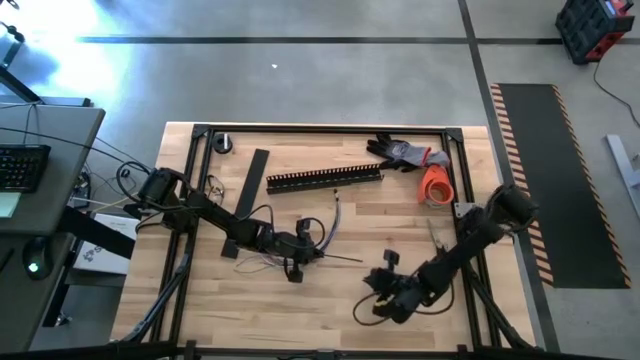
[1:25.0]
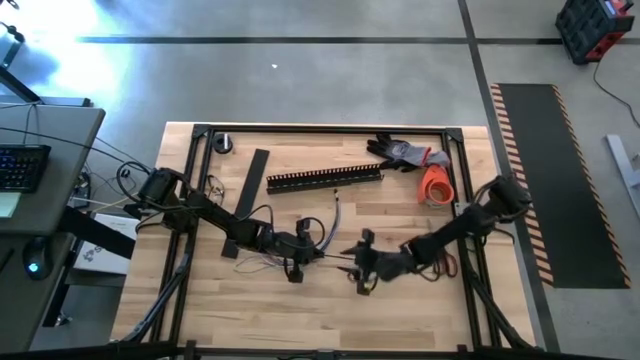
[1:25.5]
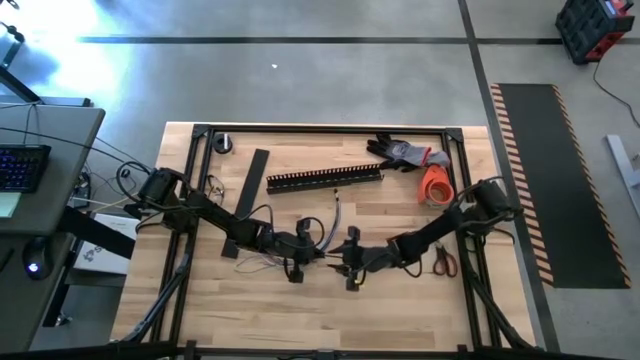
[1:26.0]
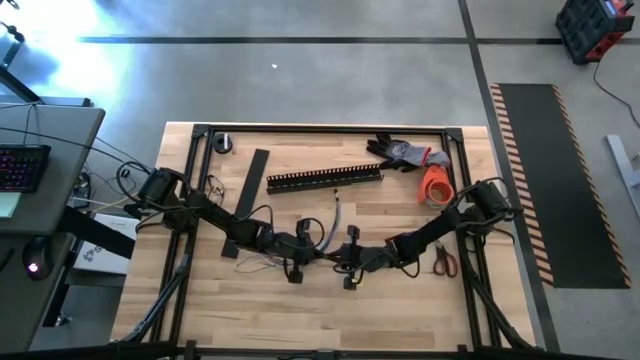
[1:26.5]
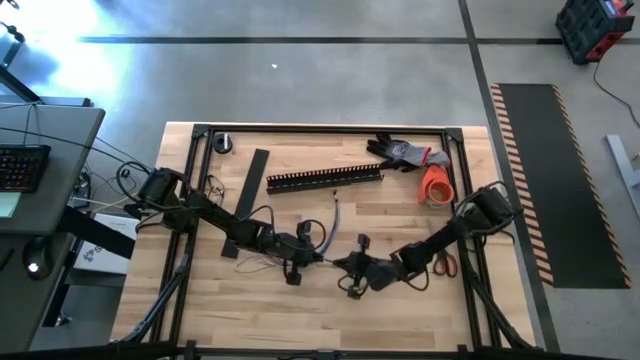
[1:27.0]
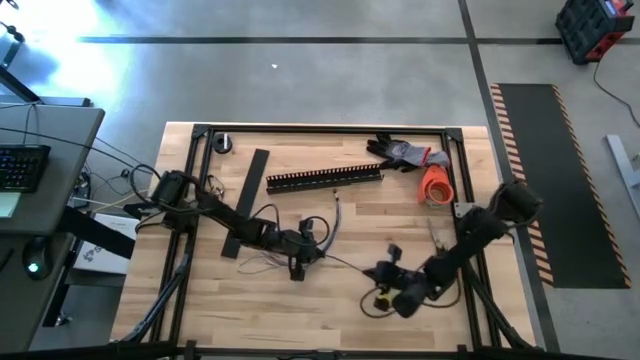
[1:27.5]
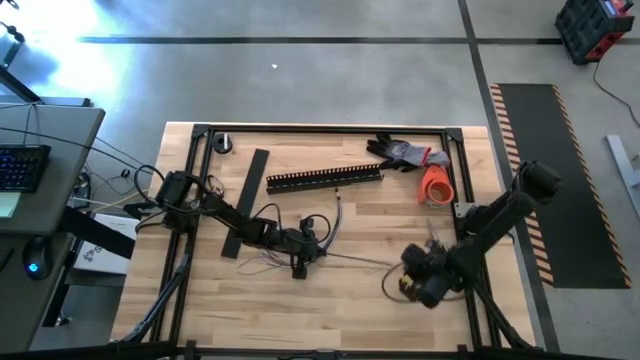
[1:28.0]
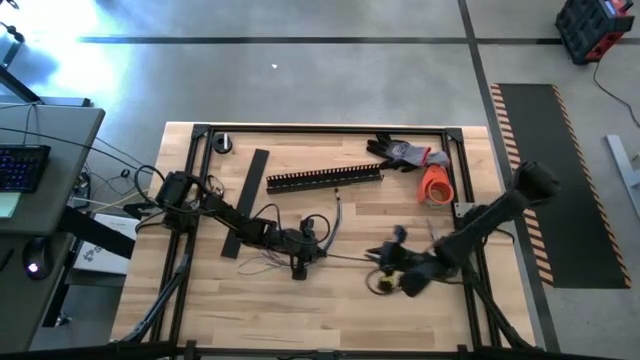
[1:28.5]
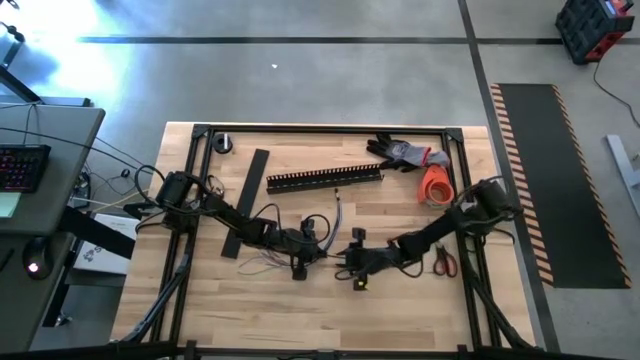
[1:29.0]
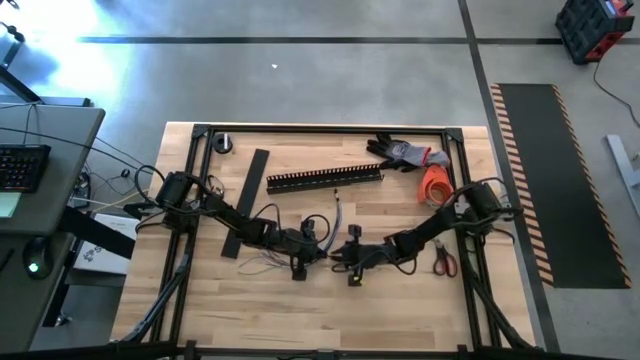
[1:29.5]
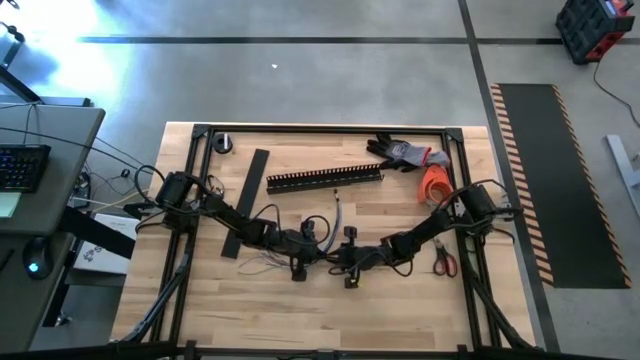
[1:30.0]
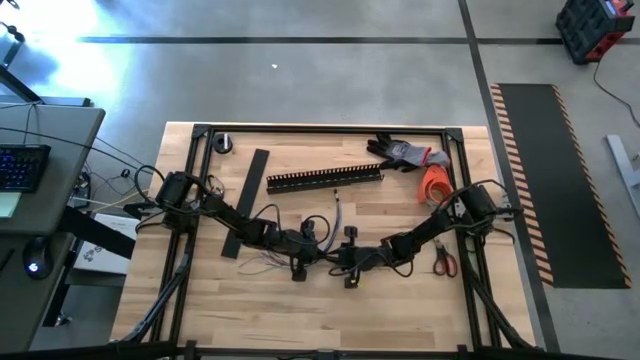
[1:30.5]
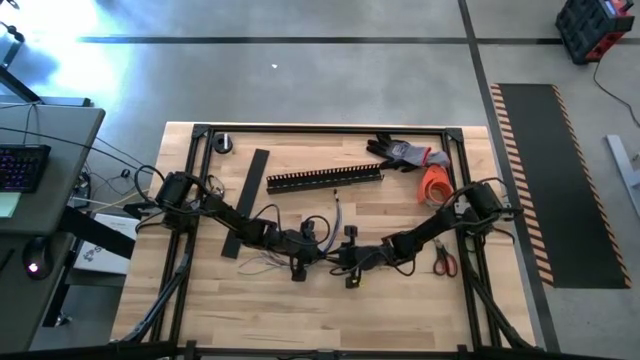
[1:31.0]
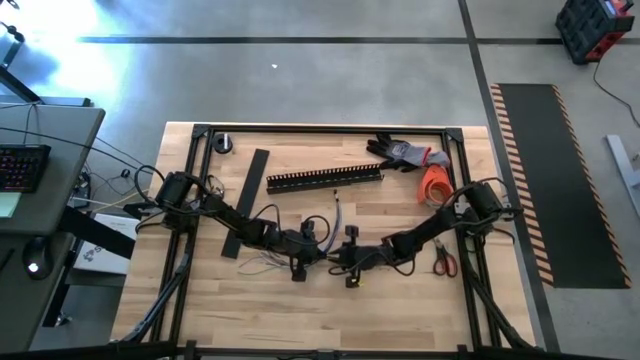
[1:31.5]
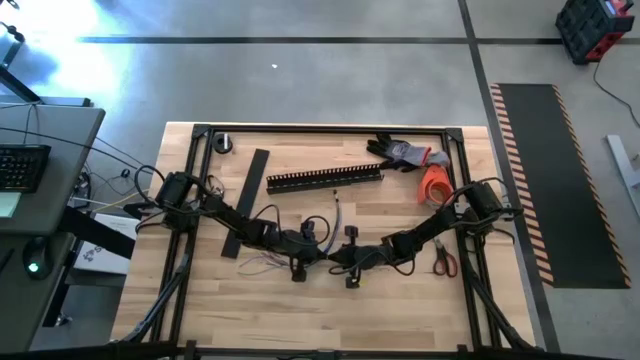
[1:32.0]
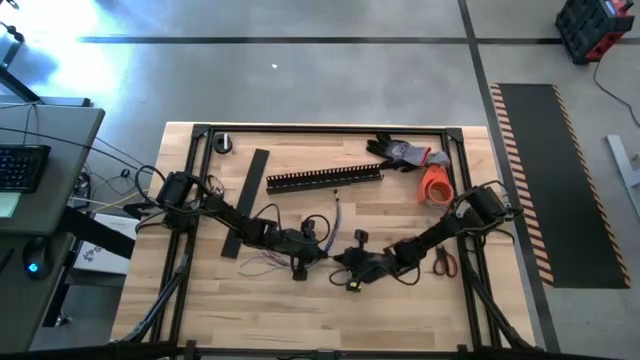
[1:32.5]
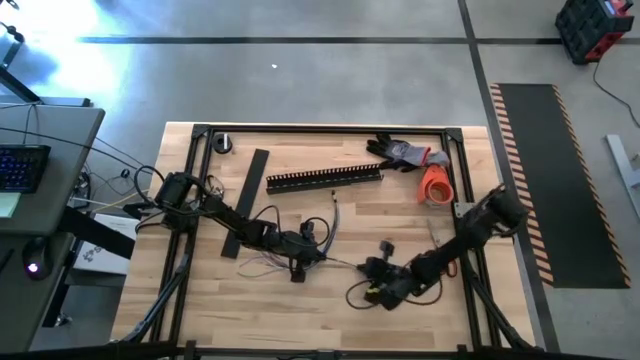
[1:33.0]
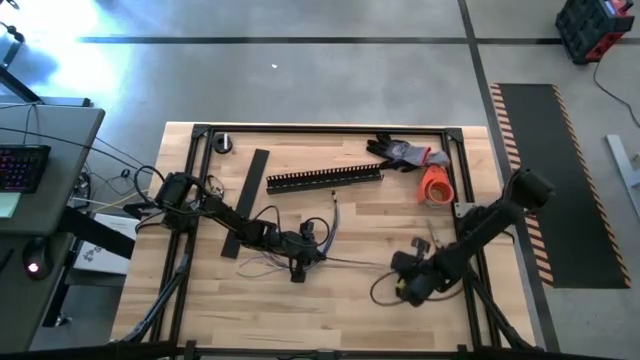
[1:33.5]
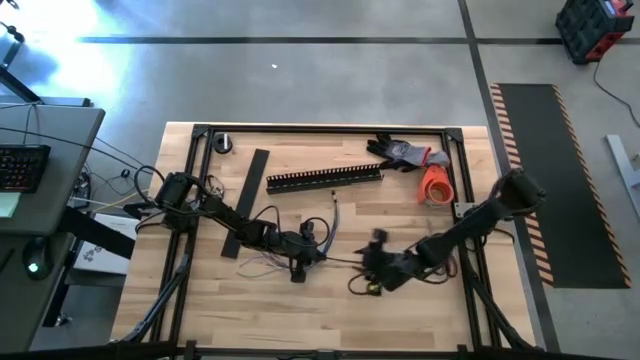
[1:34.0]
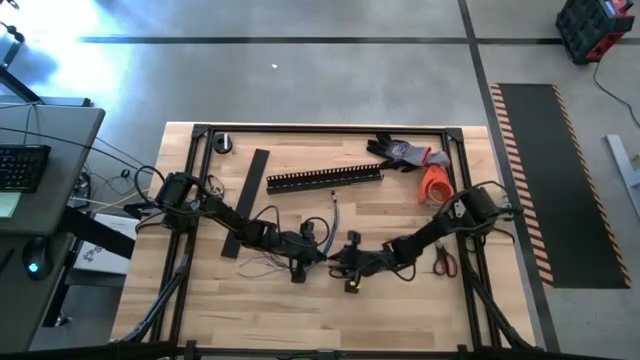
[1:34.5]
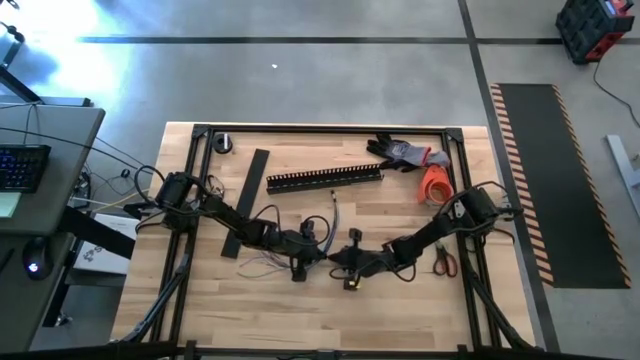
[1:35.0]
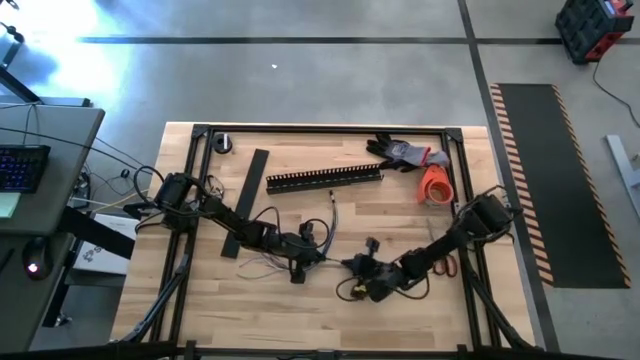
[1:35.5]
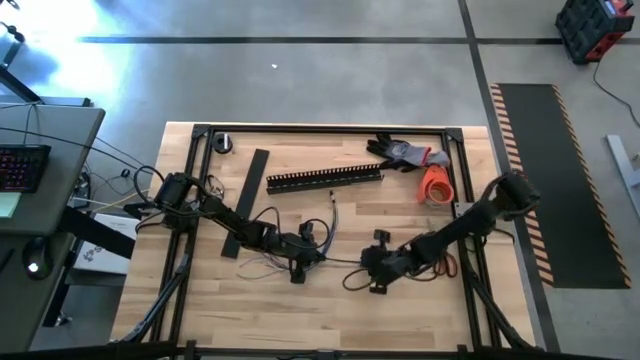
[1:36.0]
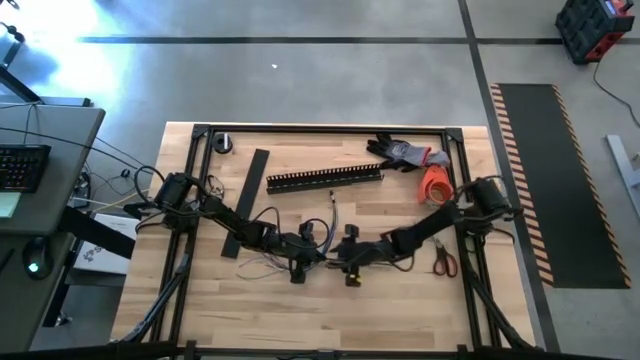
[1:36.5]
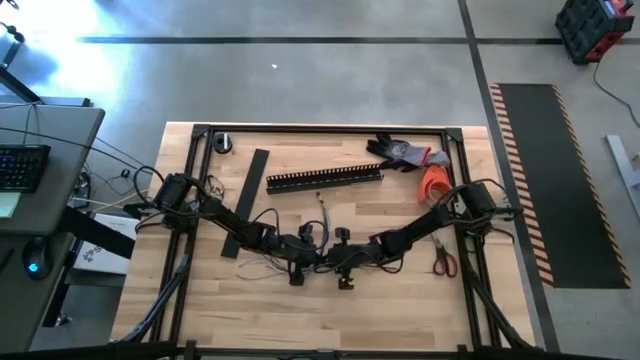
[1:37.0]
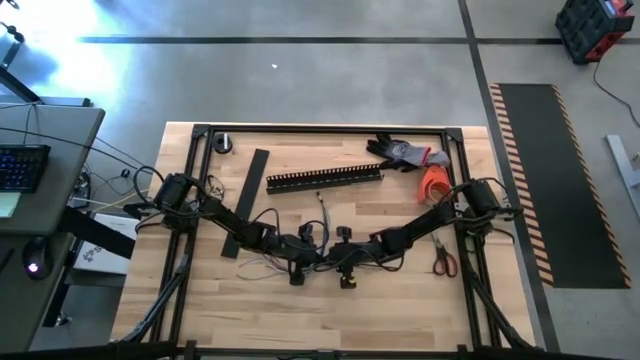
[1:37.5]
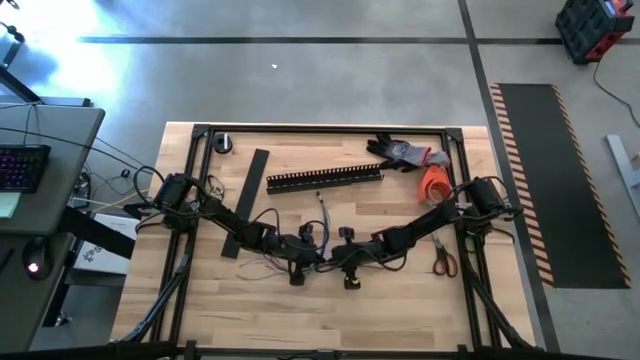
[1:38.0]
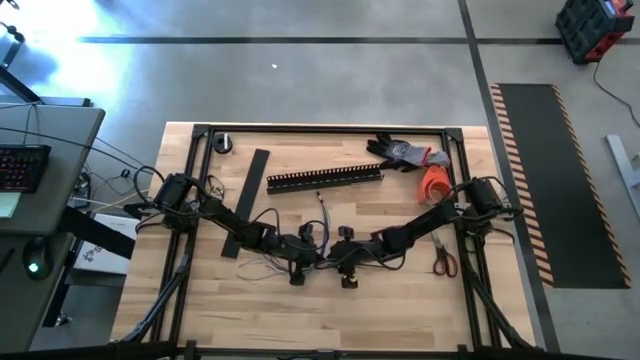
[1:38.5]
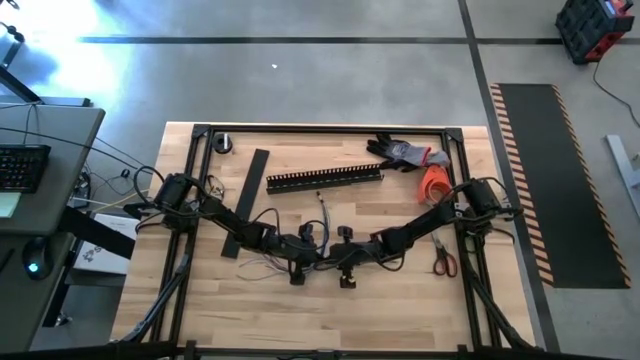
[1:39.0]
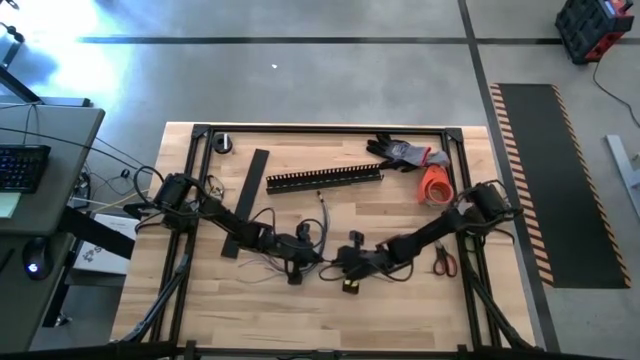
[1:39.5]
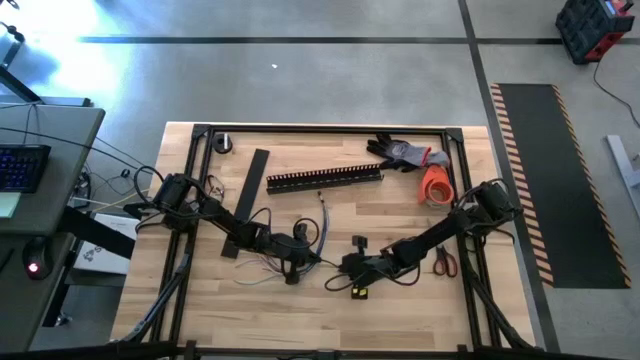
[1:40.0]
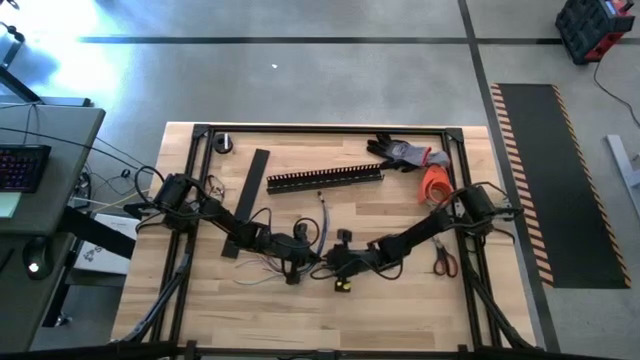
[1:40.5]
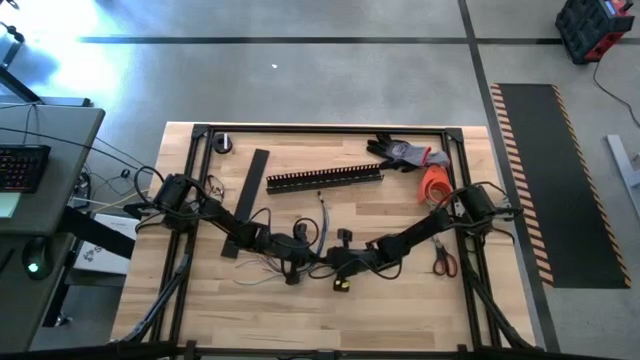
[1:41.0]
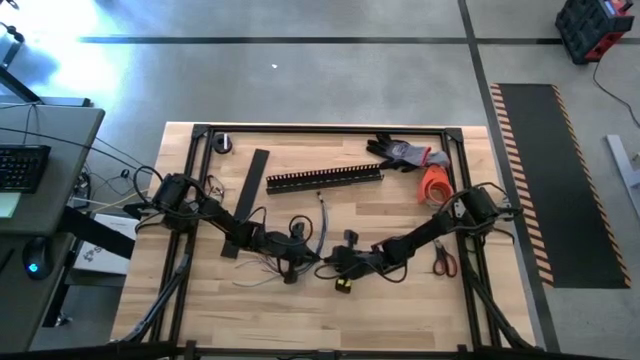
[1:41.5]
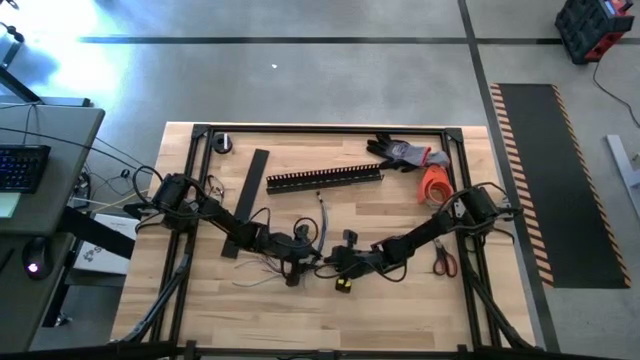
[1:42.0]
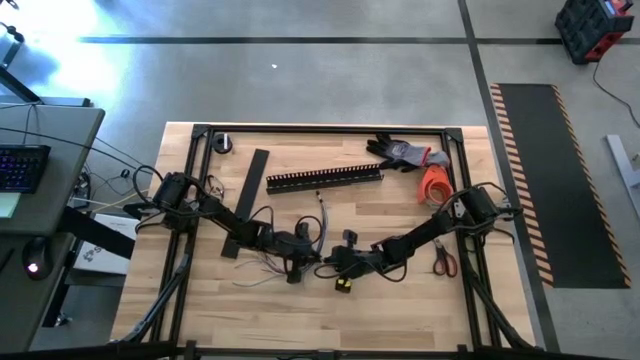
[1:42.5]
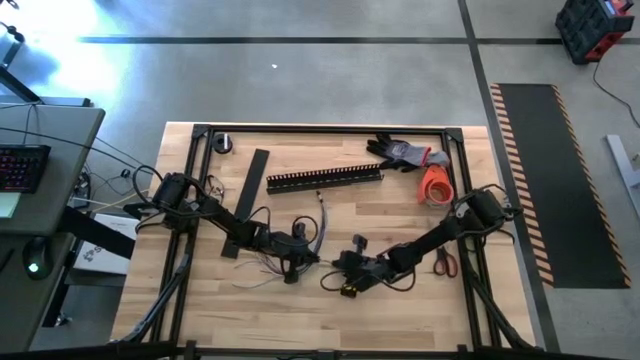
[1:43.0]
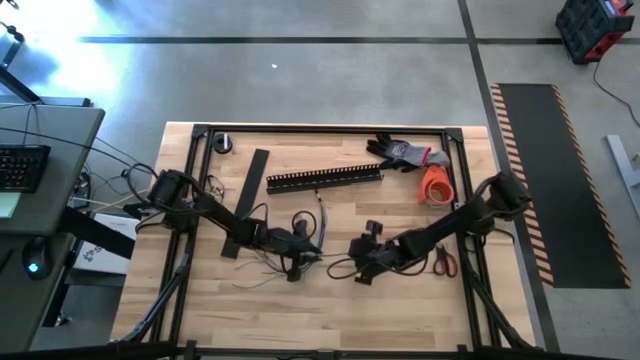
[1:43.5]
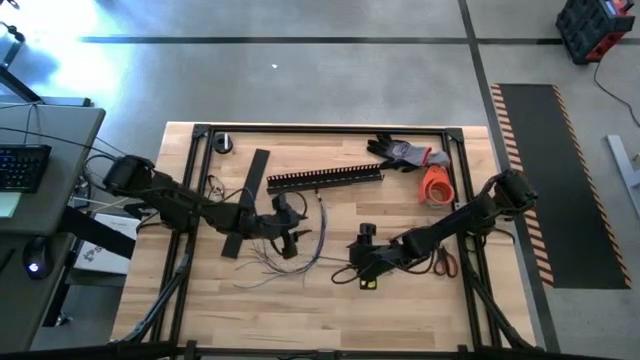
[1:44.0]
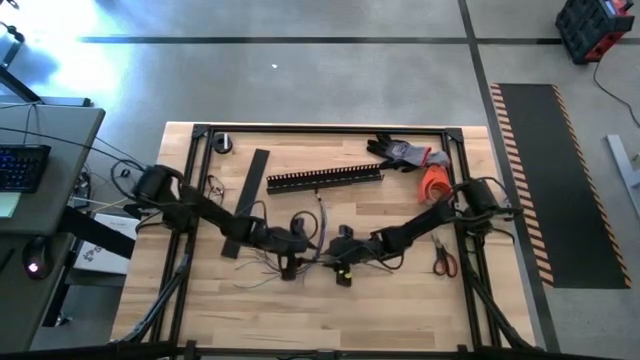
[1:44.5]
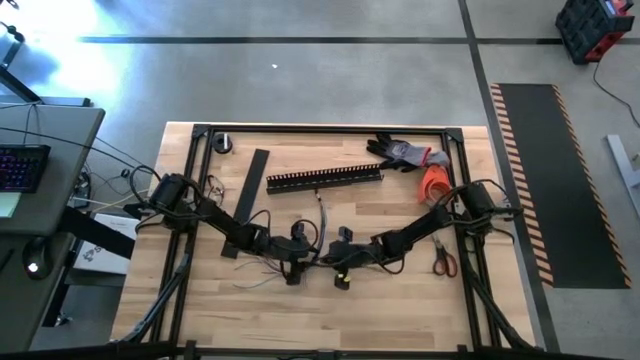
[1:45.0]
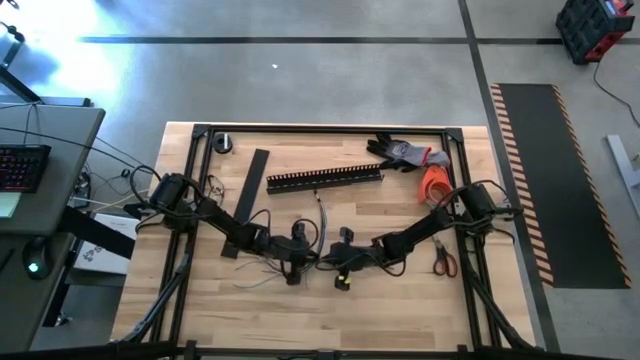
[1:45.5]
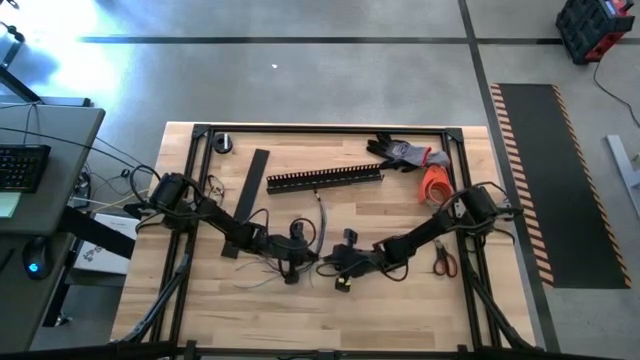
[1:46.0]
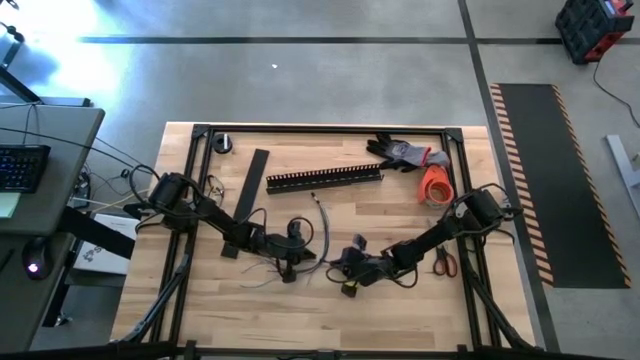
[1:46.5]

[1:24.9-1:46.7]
Task: Ziptie cables
Wrap the cables together using a zip tie
